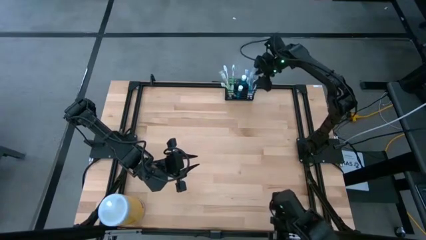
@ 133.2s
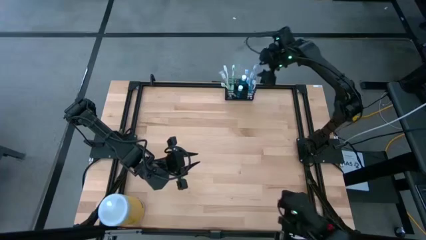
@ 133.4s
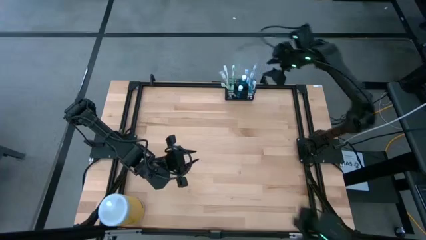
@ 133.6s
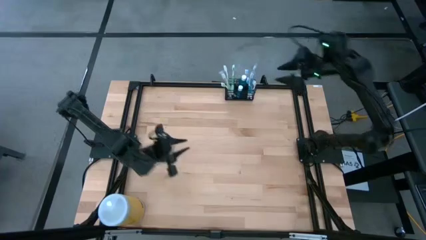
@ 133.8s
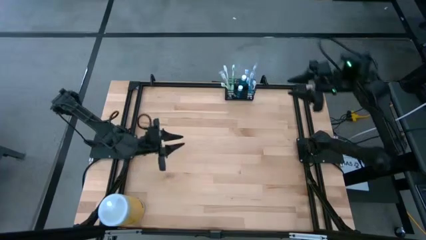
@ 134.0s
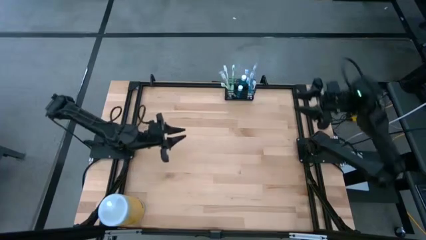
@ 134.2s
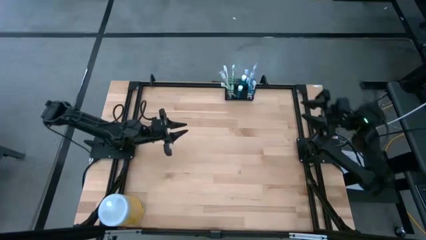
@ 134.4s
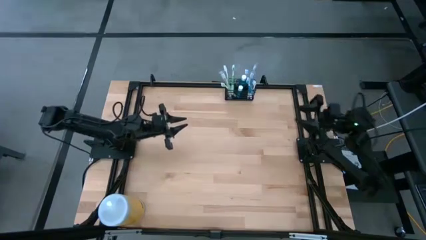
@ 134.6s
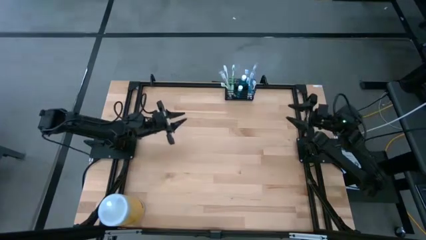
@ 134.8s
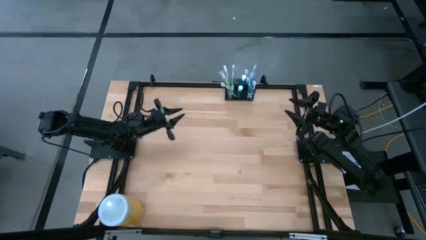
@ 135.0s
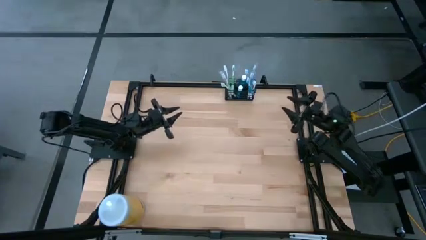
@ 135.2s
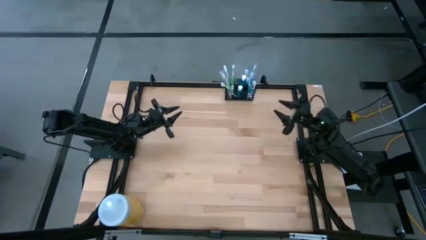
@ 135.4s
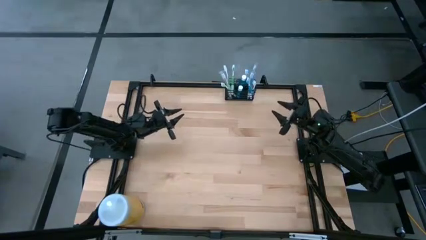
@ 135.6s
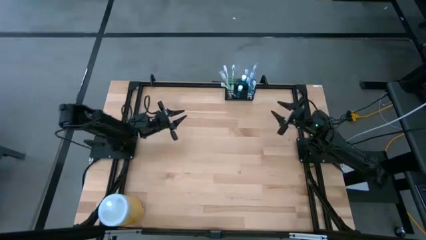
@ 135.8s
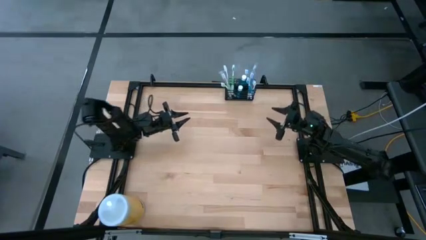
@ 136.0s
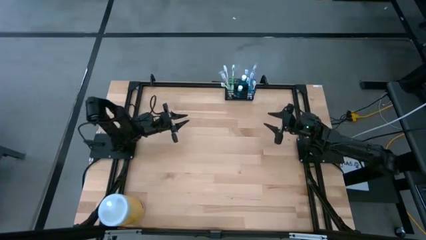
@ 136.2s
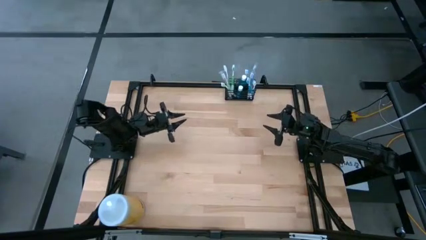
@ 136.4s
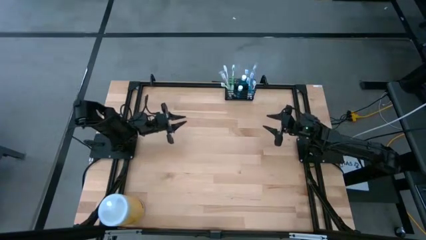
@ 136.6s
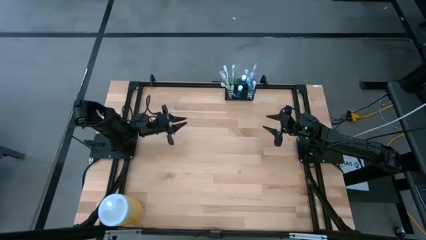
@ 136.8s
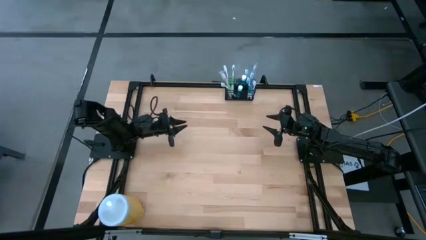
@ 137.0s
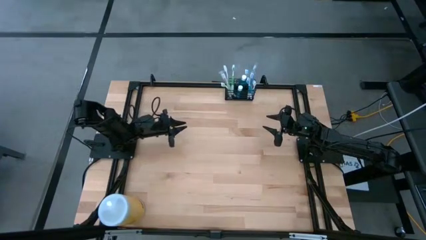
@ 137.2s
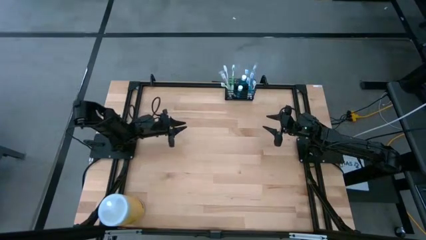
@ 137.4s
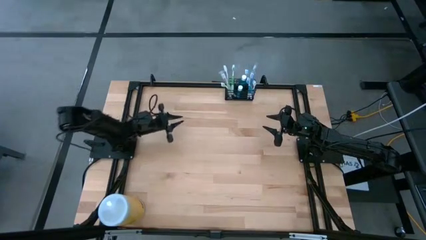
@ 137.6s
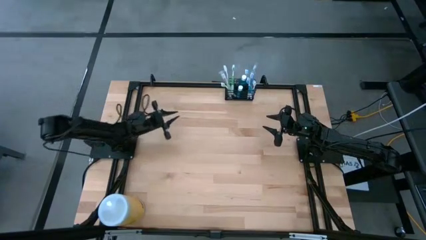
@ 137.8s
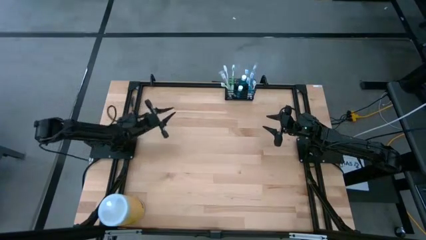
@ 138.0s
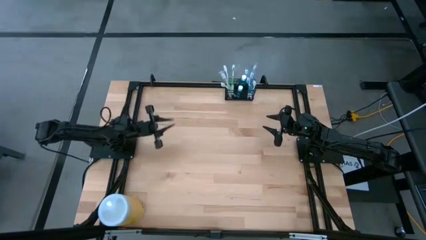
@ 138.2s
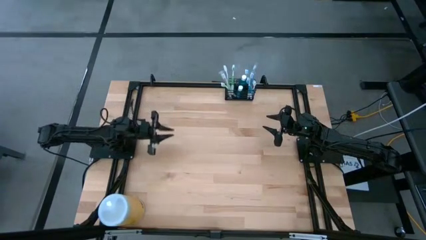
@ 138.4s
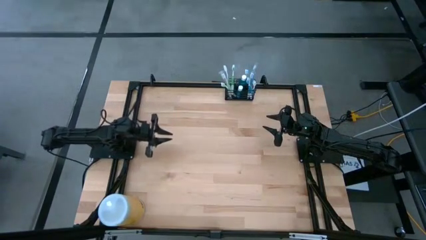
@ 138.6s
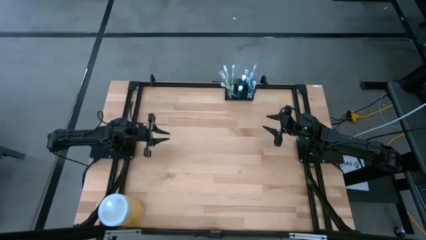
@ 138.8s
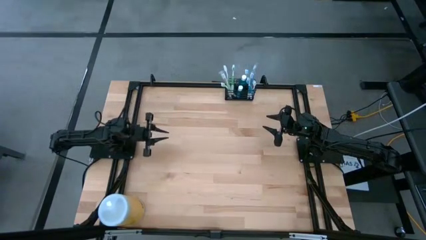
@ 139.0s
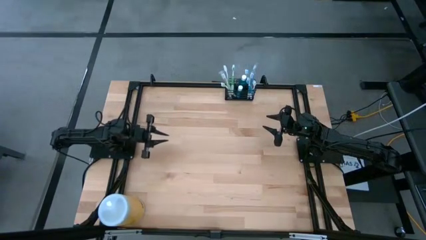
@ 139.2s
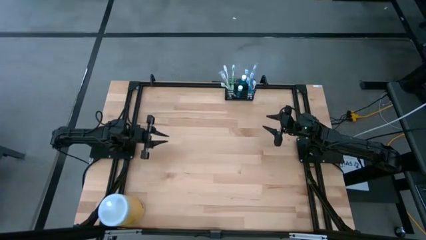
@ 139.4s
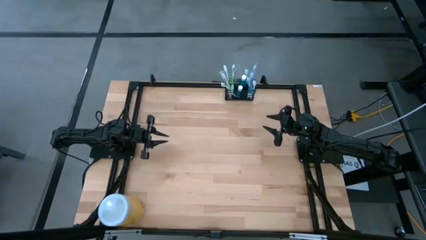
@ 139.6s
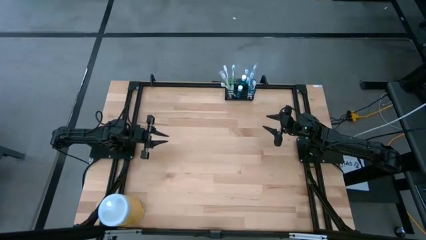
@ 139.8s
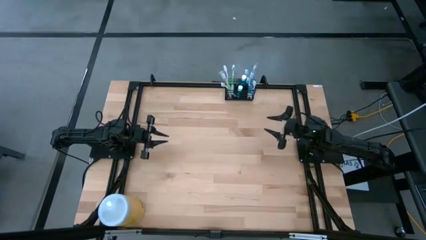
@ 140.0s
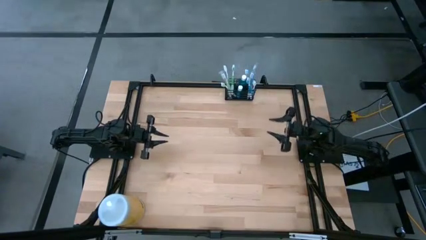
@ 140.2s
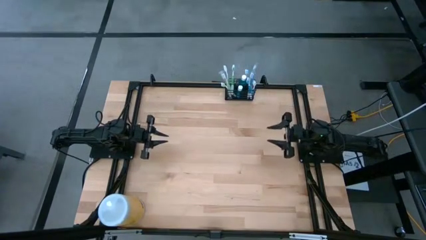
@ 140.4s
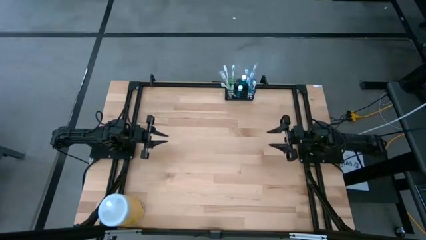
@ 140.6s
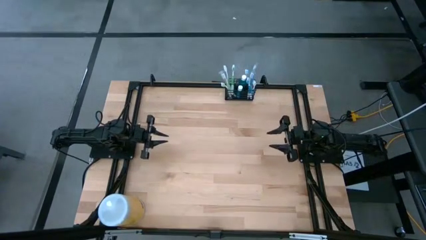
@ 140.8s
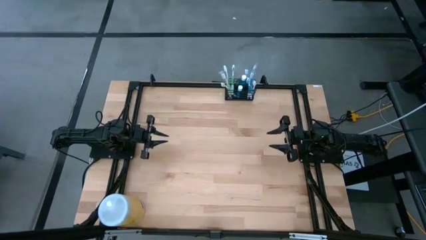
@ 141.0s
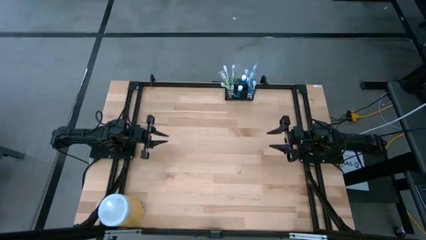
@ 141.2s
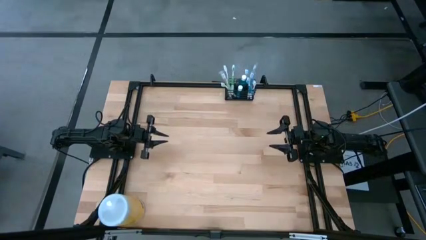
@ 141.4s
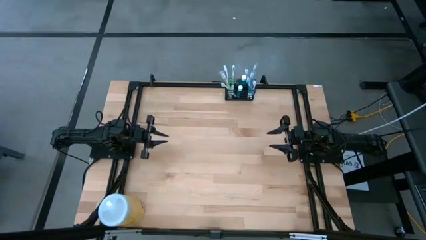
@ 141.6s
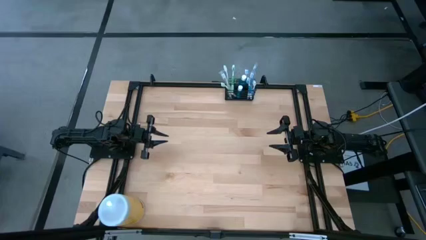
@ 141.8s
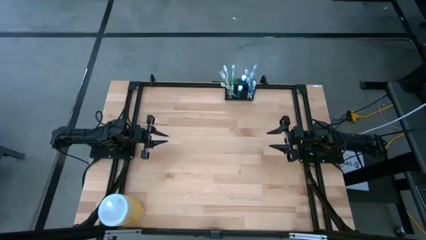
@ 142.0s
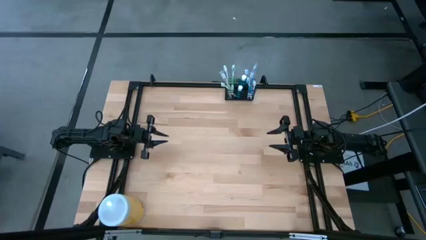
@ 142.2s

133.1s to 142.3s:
Task: Pick & Place toothbrushing station
Return to Home Position
